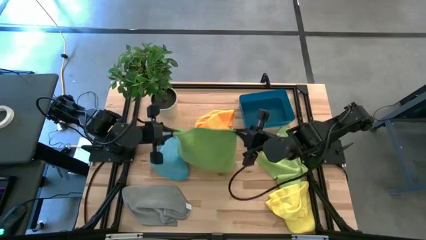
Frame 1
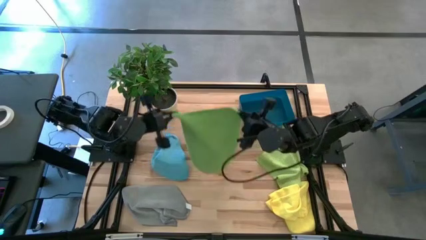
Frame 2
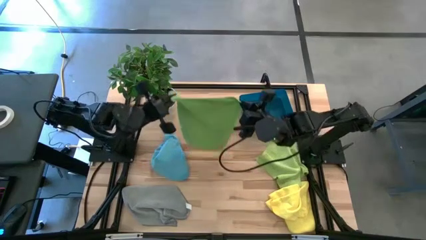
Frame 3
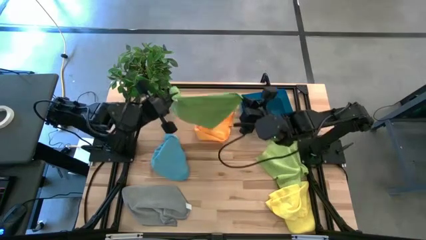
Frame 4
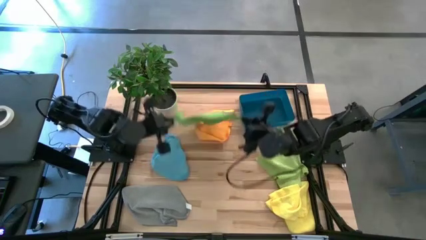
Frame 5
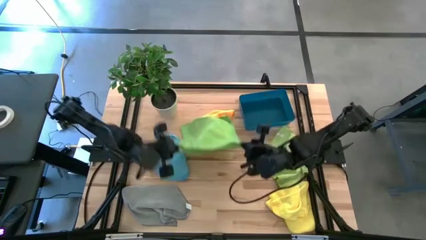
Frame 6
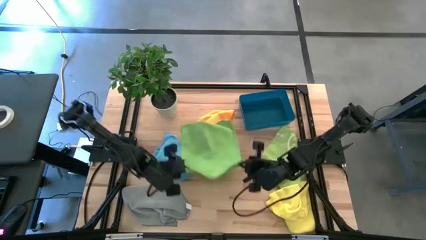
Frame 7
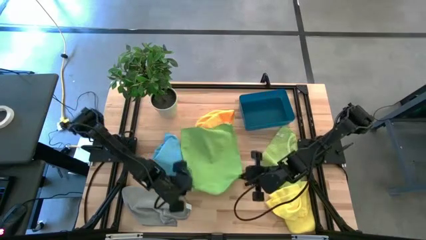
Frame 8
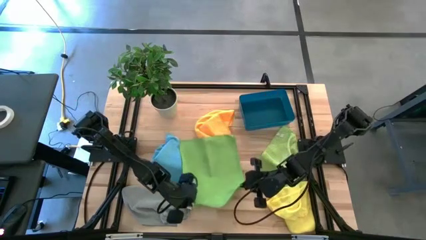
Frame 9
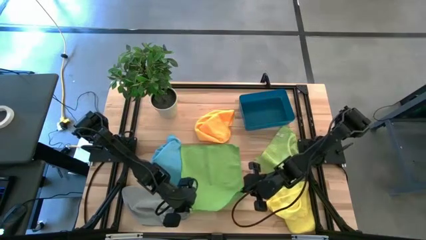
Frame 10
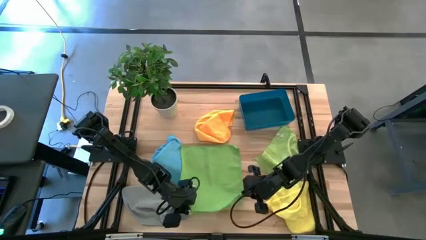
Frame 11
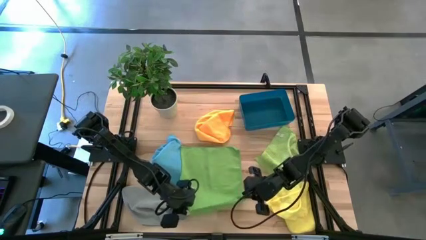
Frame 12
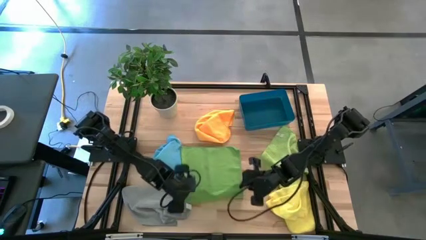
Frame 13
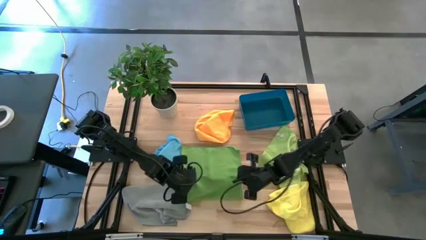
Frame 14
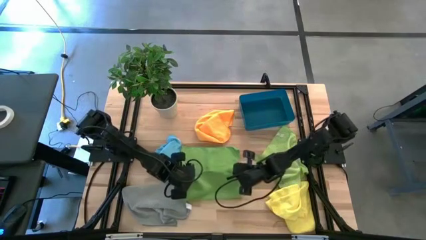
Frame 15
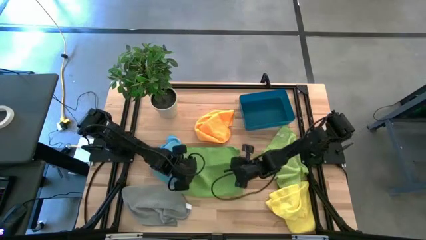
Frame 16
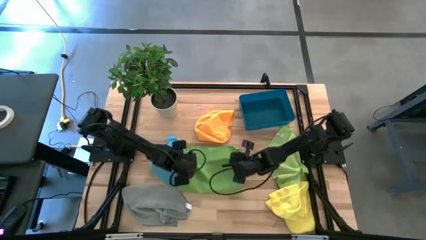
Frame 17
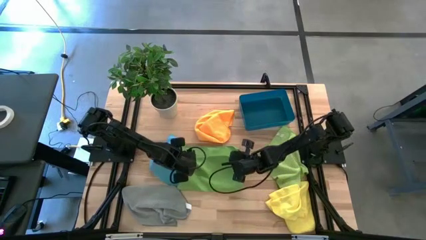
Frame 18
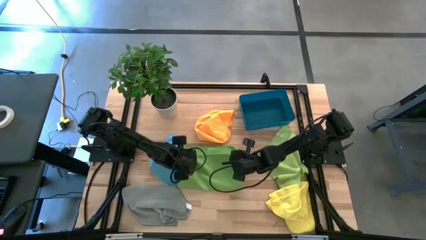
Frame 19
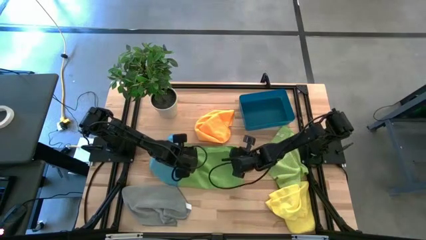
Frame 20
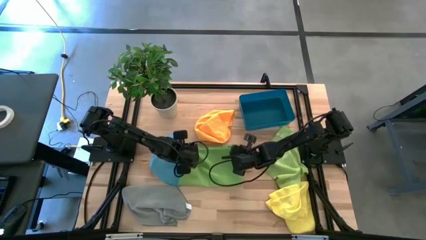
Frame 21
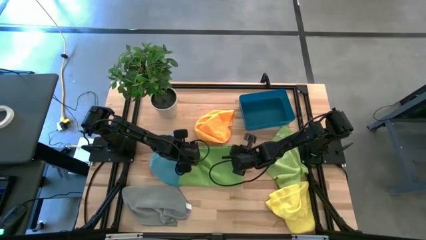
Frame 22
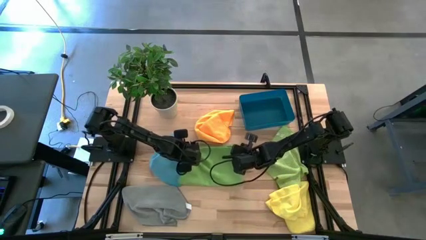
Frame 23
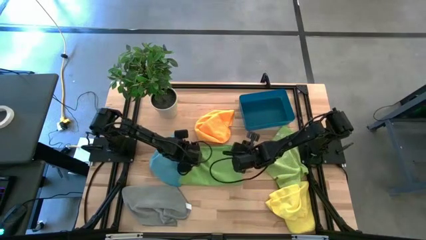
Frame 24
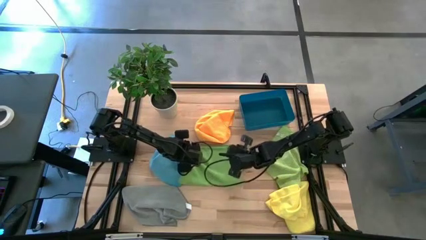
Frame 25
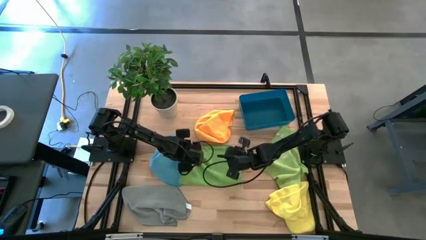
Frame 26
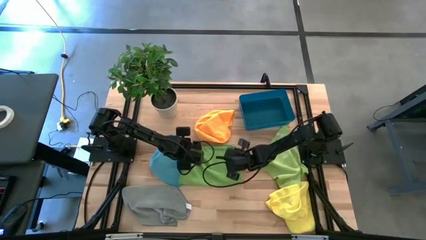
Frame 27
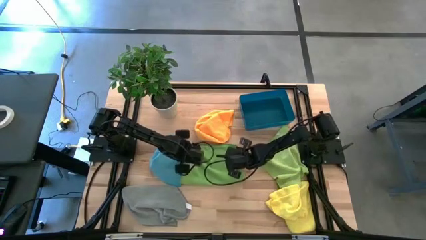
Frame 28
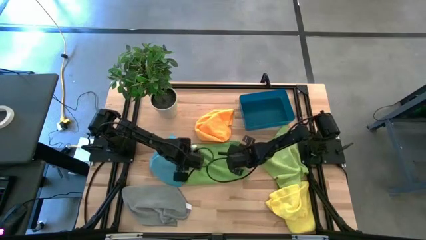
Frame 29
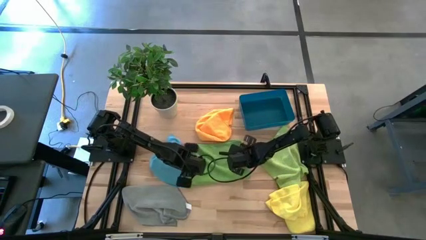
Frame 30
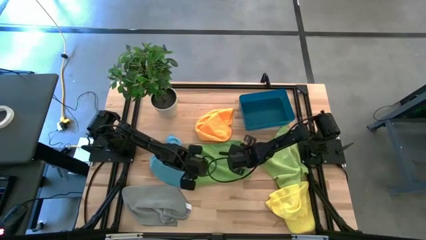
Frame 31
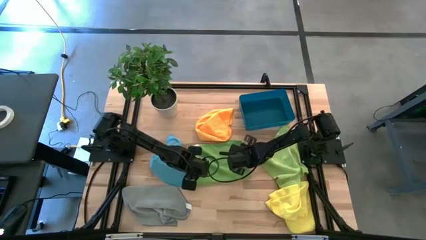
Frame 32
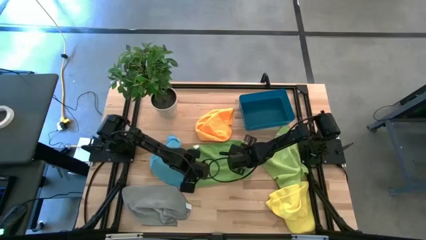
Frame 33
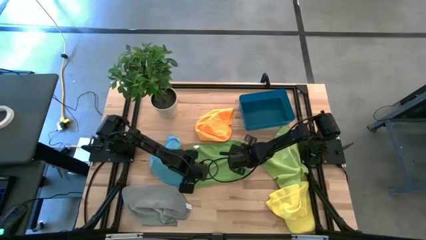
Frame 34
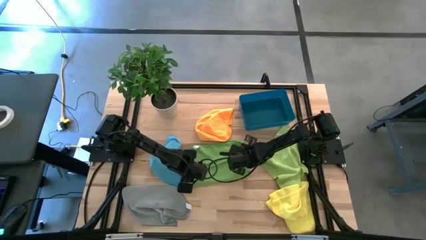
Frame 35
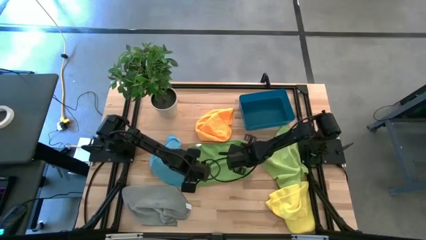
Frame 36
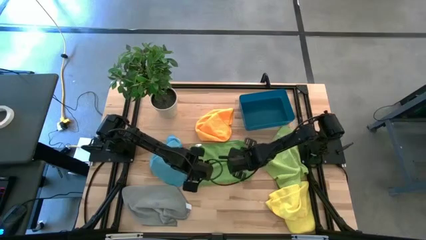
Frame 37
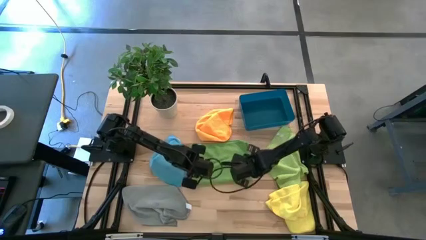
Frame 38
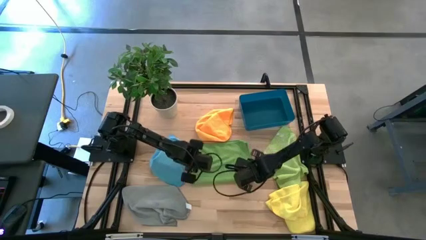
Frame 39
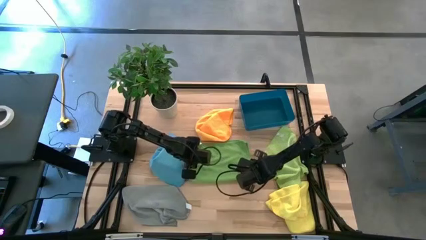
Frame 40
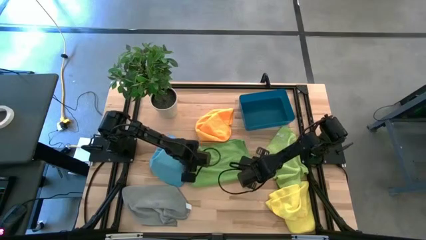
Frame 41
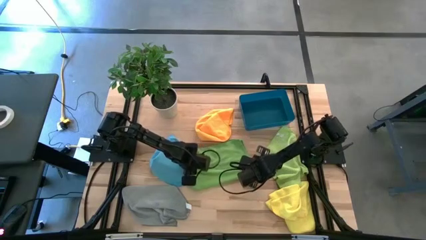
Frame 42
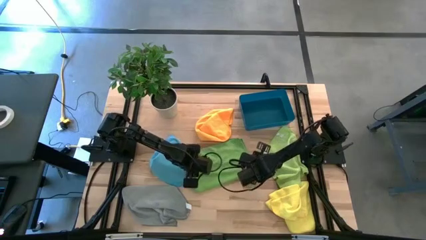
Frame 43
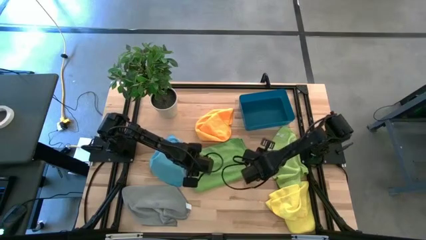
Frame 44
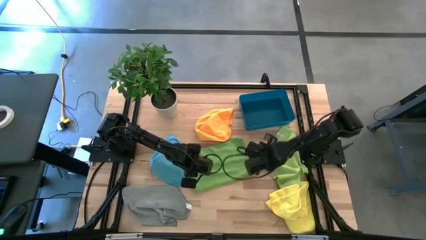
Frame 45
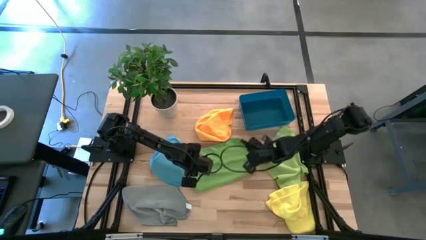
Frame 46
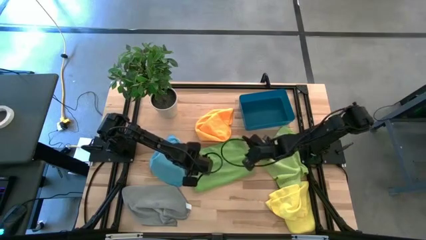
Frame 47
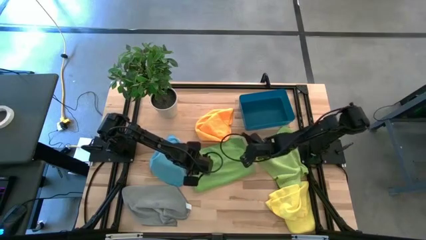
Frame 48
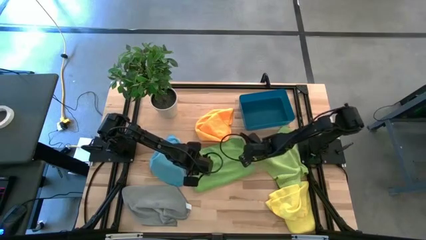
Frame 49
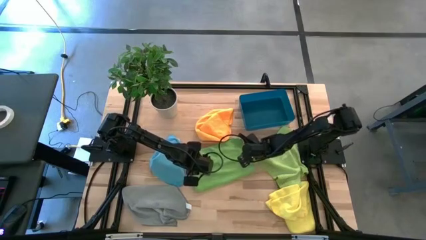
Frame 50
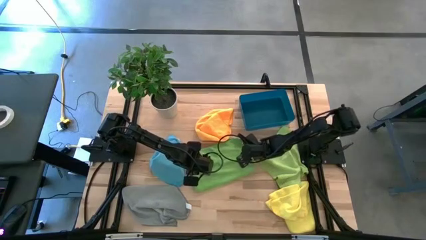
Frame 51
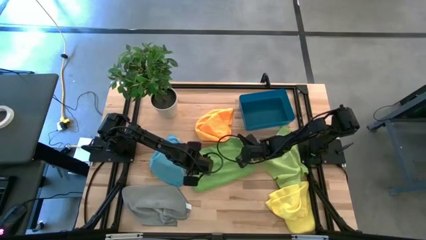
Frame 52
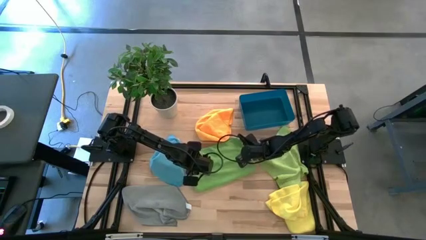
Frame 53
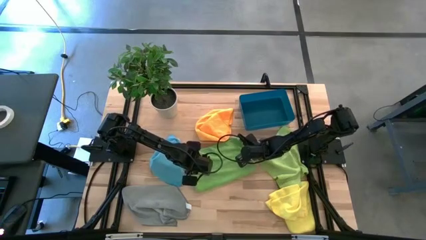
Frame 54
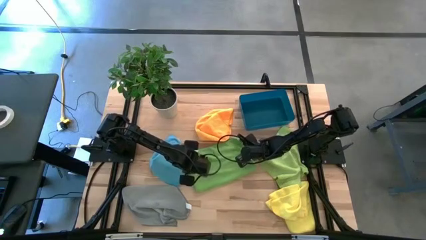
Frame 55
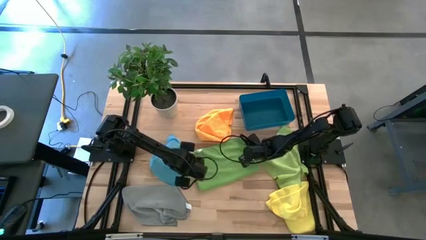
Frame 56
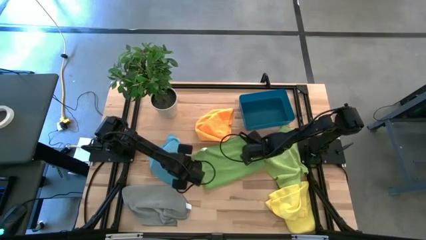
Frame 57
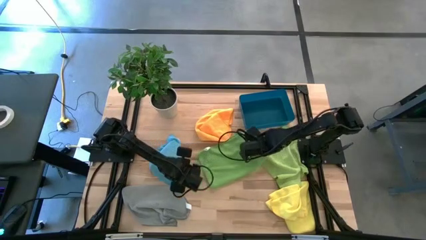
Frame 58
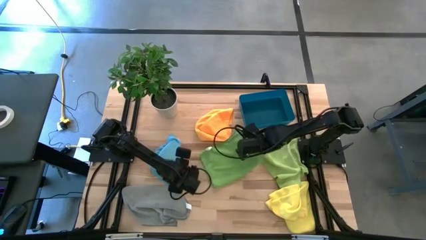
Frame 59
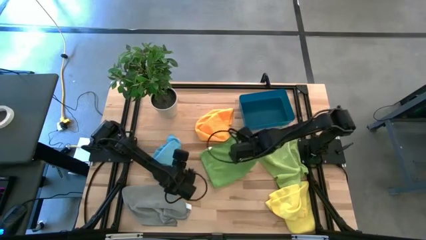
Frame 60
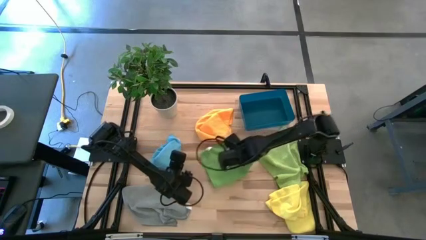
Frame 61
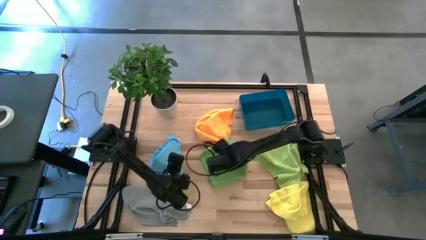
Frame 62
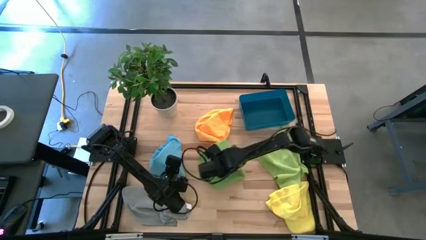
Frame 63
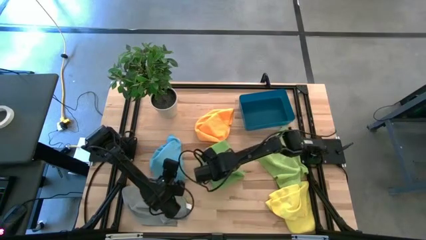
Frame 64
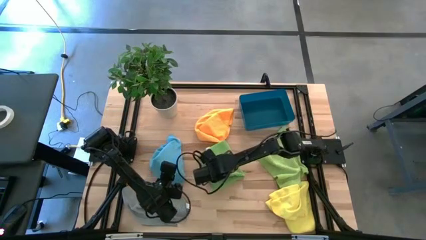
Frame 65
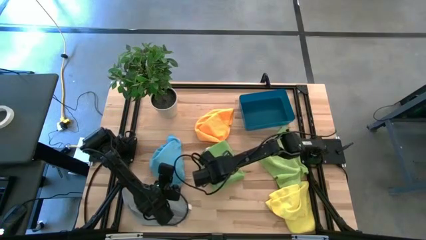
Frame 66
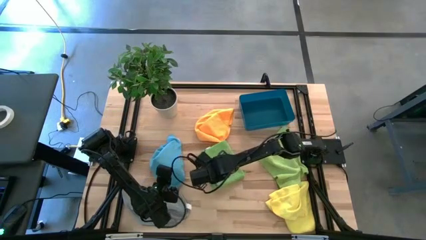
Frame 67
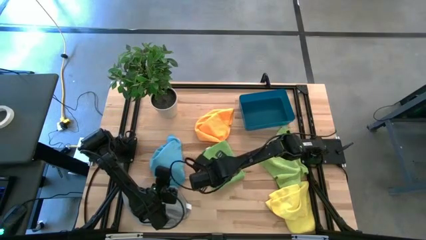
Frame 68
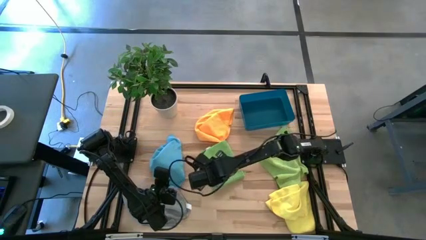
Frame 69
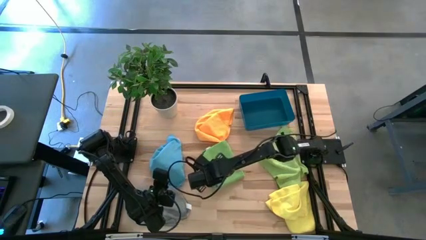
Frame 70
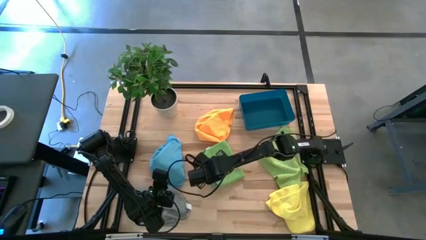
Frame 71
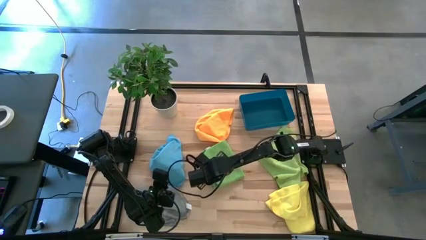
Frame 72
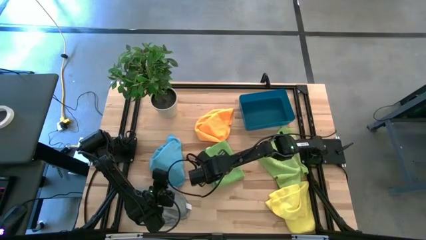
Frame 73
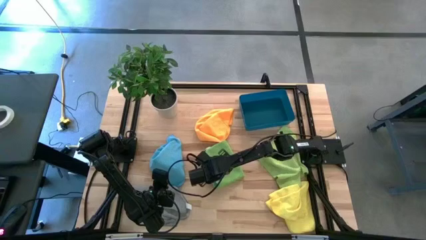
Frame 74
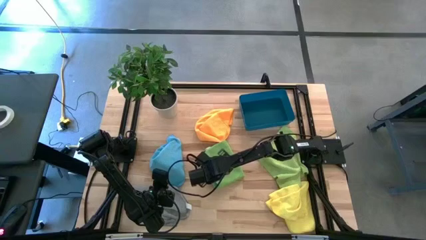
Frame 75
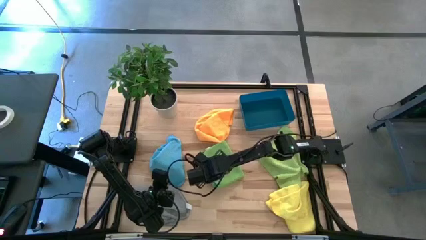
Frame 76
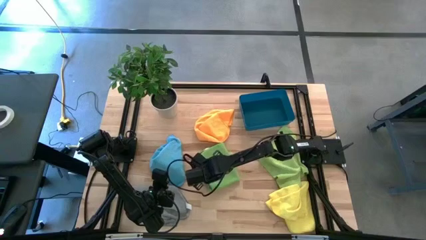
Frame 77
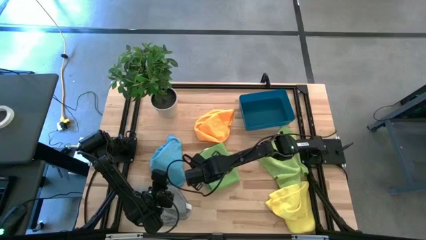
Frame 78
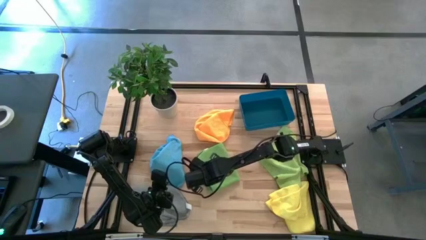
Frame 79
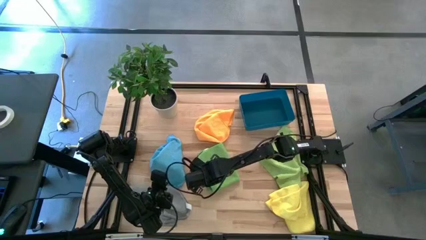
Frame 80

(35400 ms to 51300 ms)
Task: Fold microfiber towels
Fold the green microfiber cloth

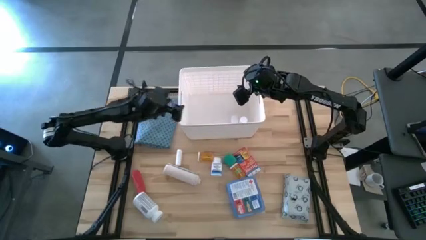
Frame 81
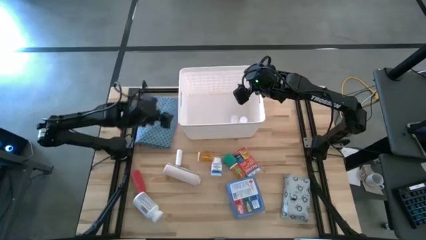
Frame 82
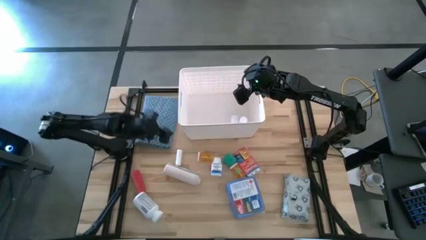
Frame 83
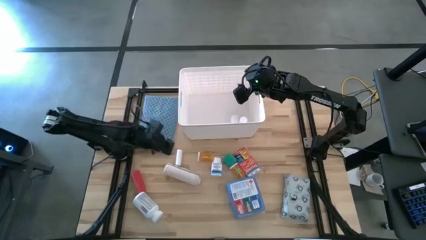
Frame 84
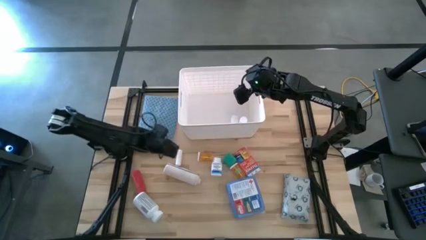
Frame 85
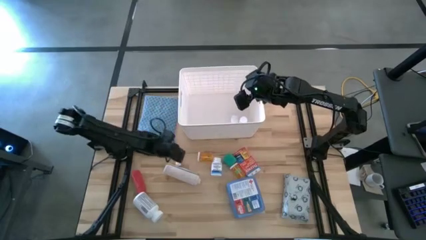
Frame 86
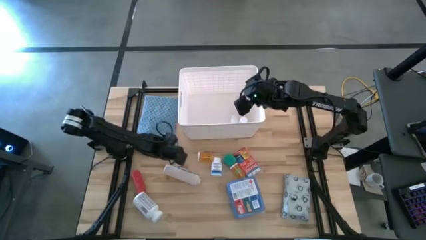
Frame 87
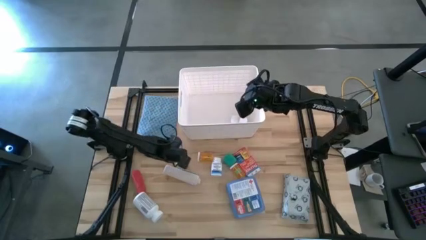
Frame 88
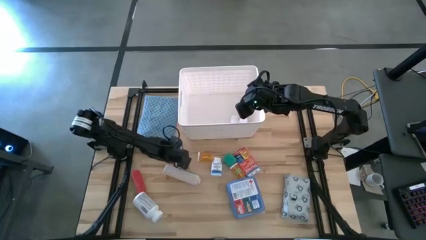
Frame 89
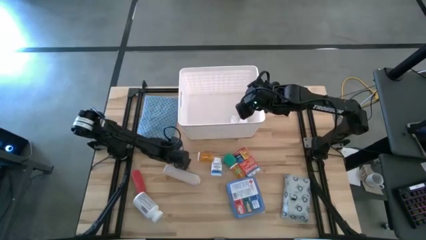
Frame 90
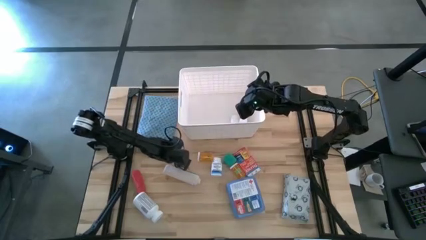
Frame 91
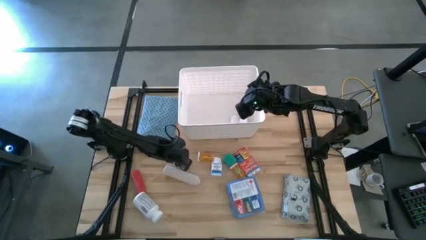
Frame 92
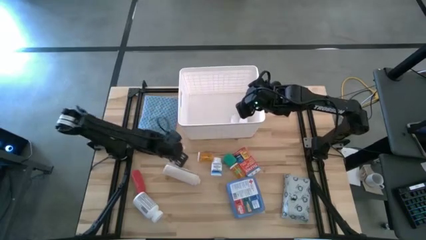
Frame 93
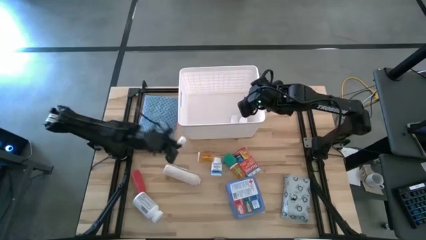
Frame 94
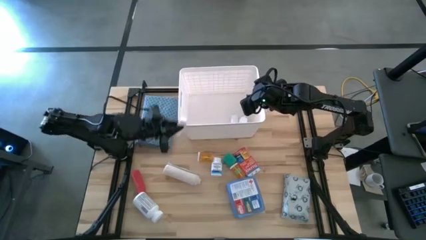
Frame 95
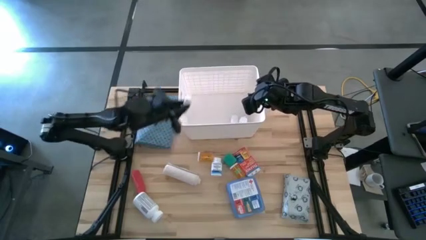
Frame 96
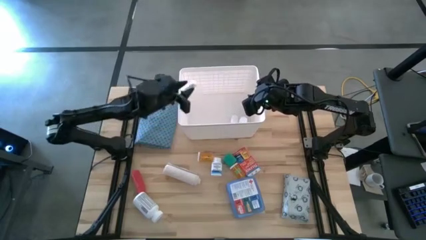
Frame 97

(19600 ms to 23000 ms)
Task: Pick & place medical supplies in basket/bin
Put the white rolled gauze into the white bin
